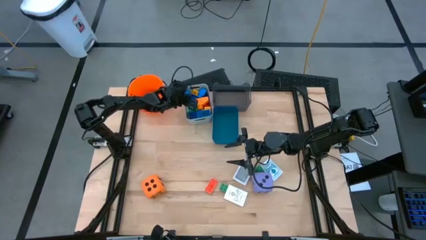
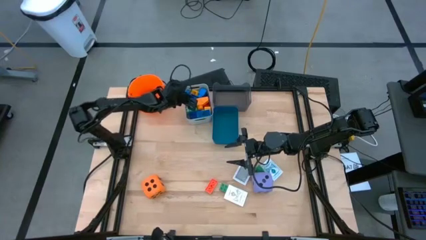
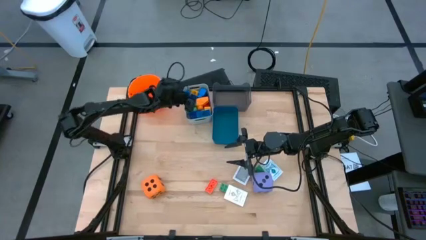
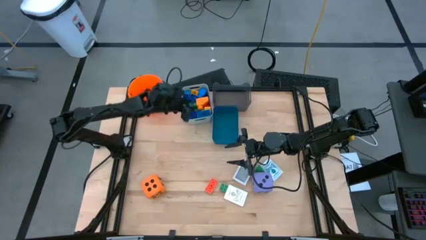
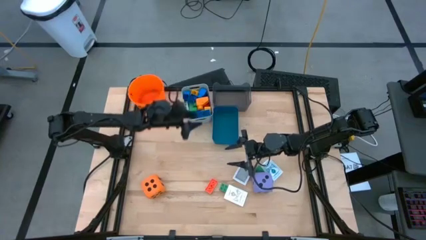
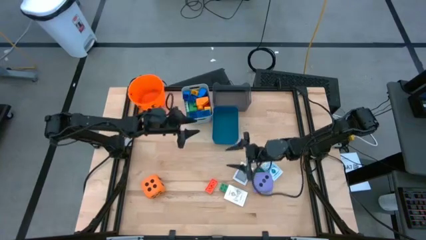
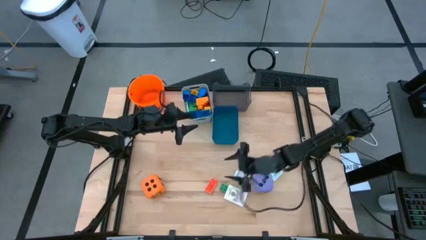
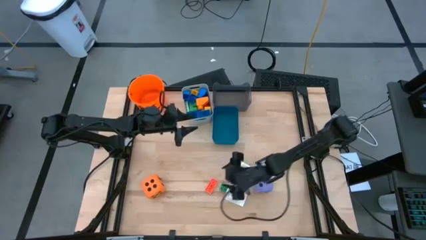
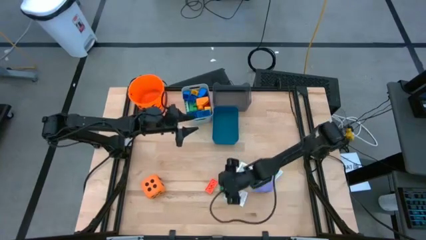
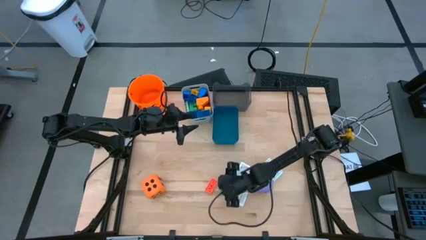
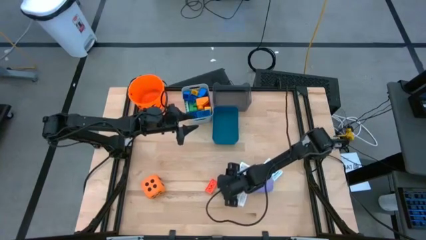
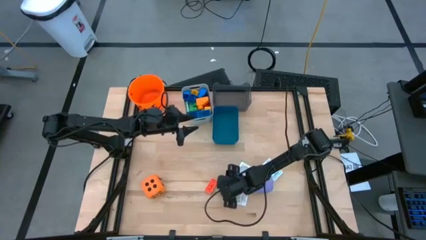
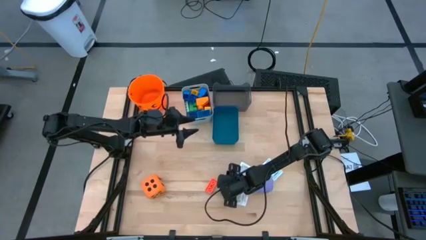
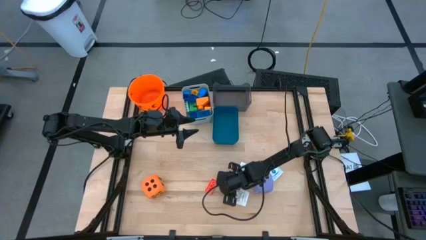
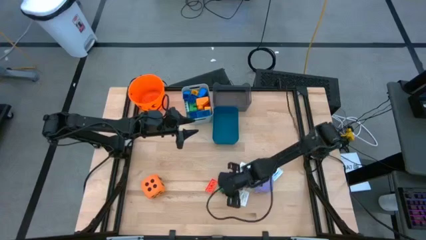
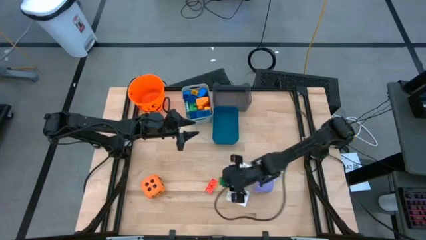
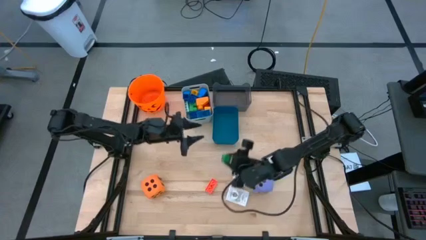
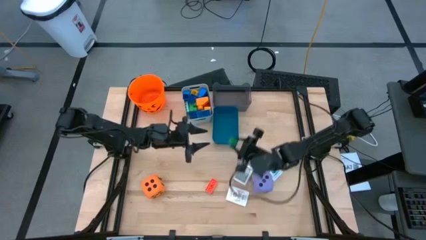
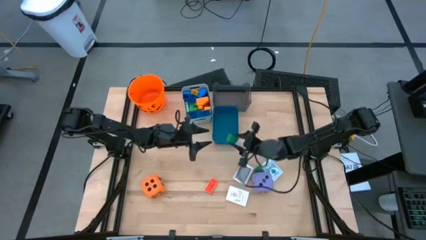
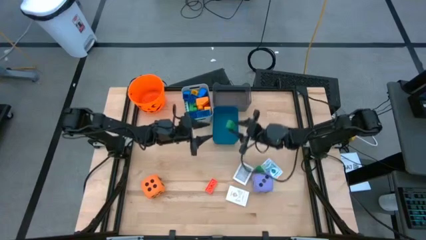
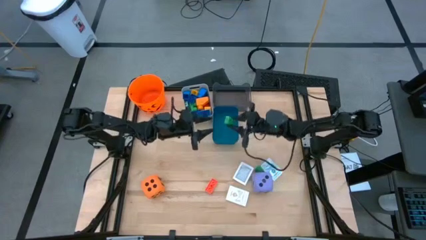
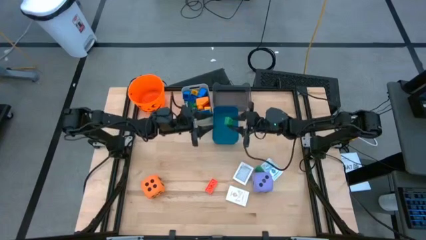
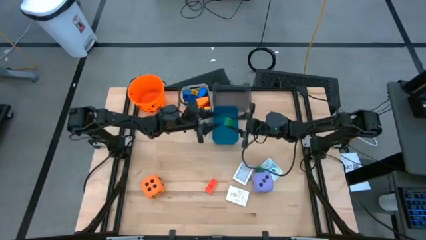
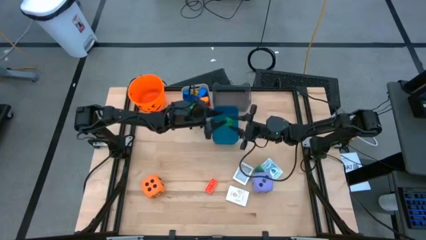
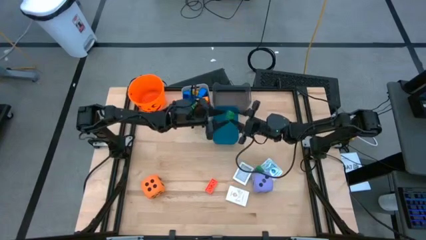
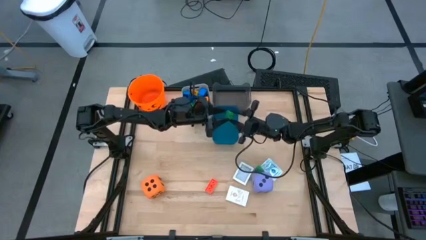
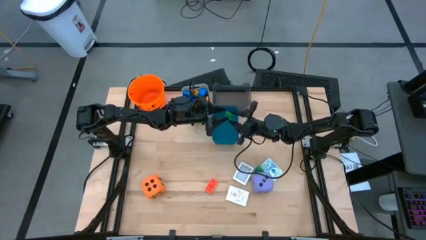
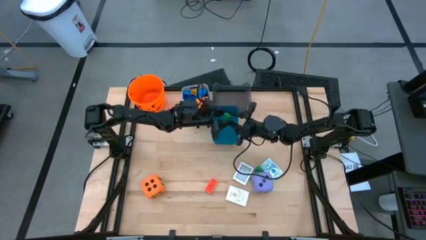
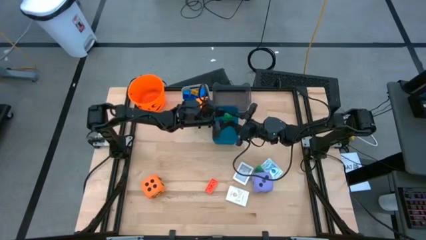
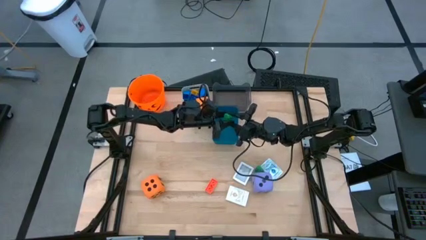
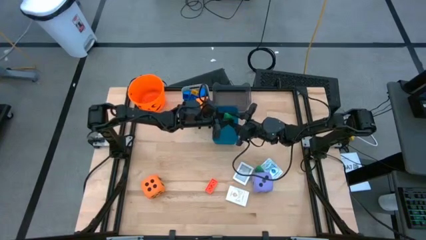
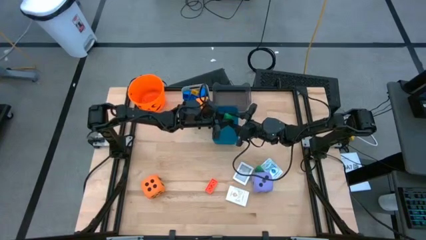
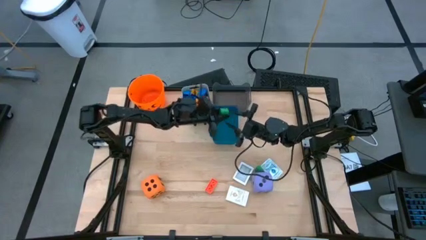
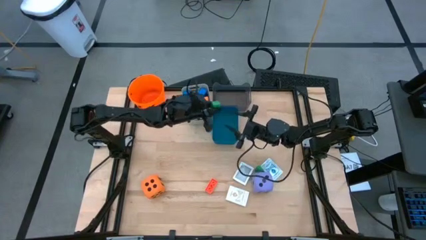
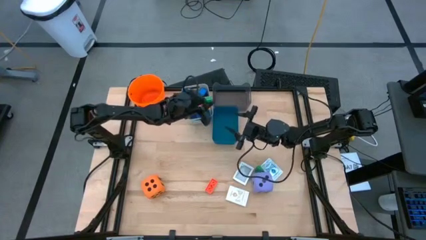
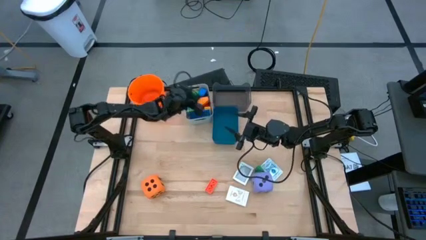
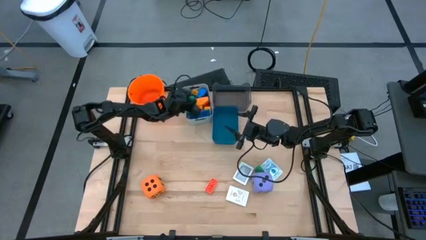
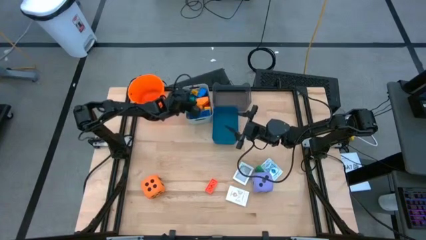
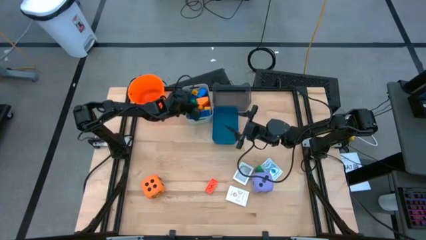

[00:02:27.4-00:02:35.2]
Task: Pick & Place Toys
Put the small green gamepiece into the white bin

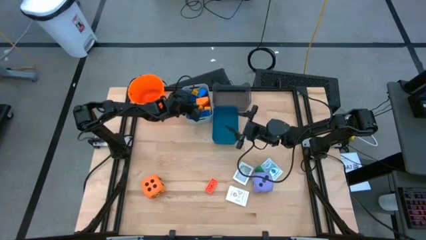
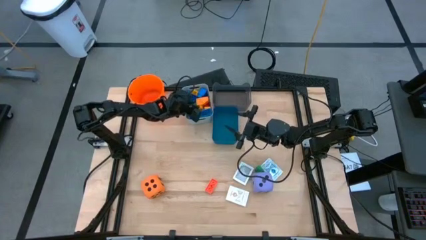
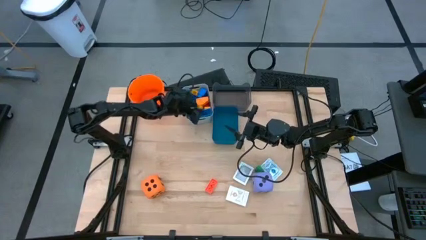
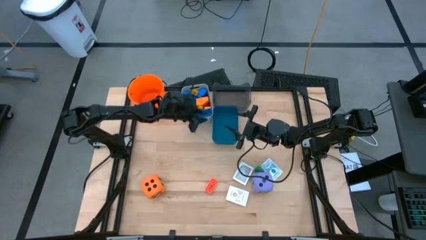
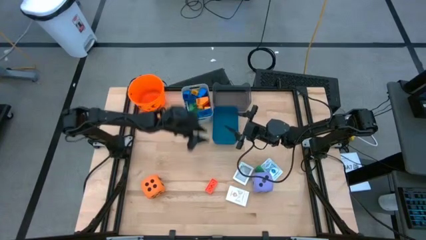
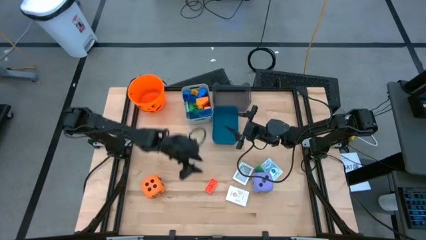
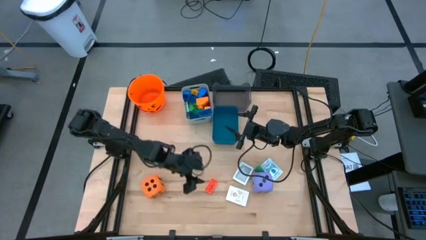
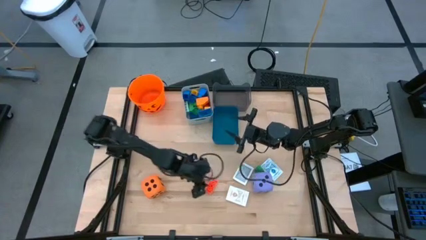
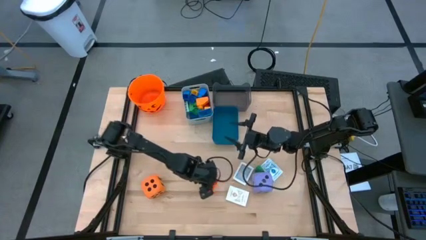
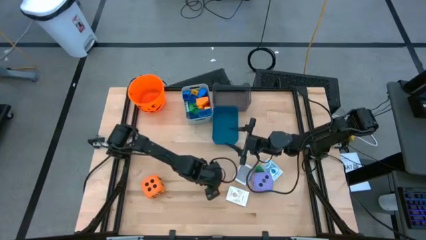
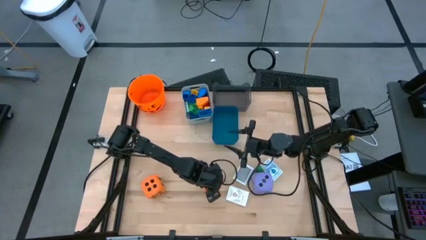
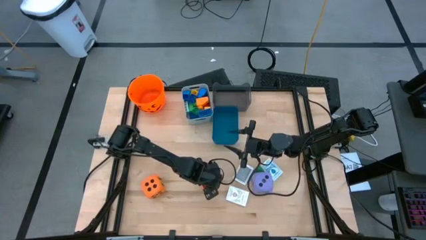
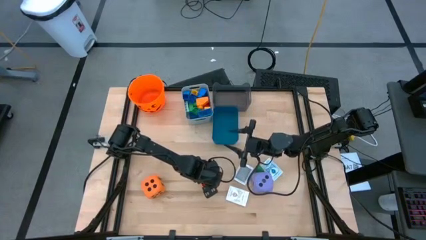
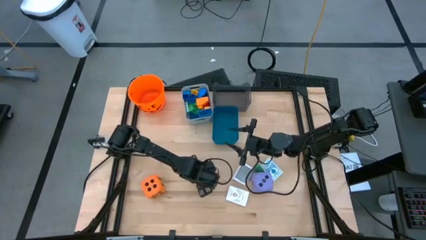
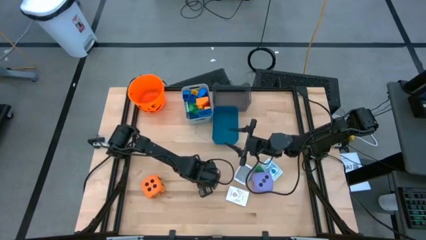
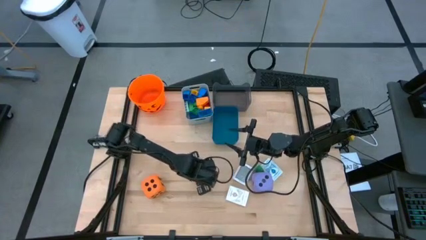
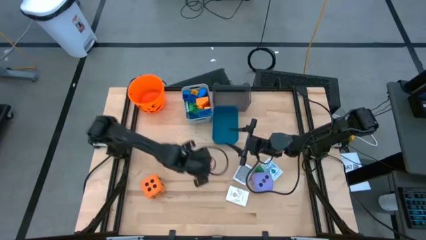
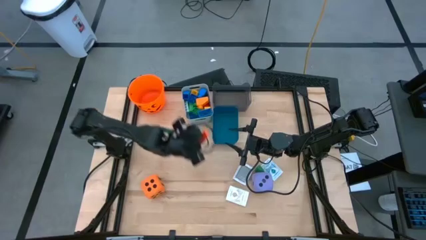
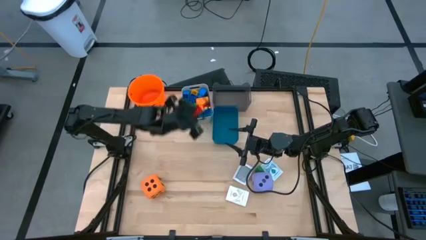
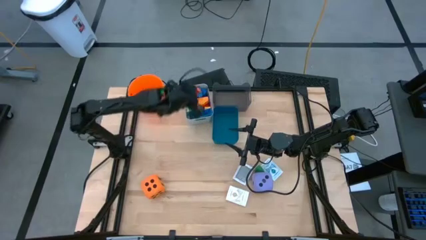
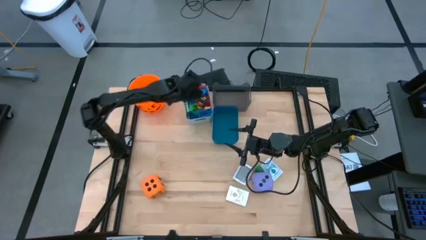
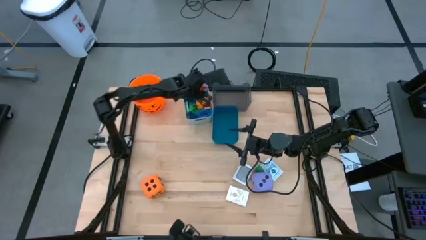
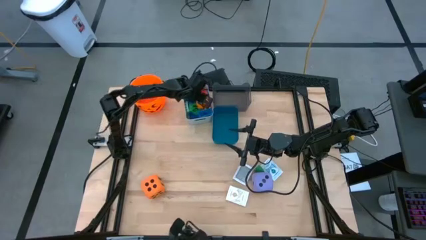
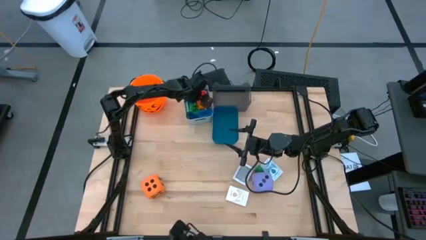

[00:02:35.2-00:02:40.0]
Put the small orange gamepiece into the white bin

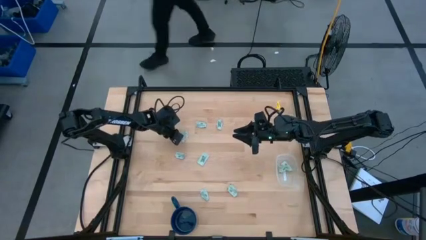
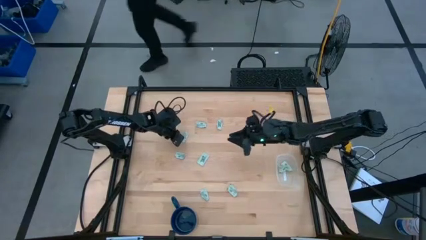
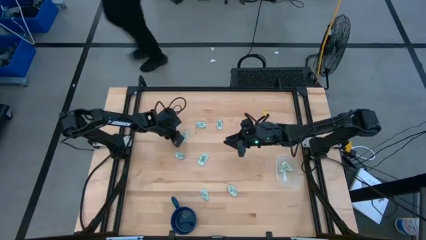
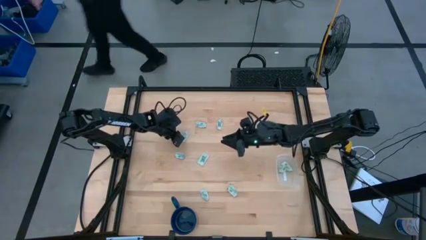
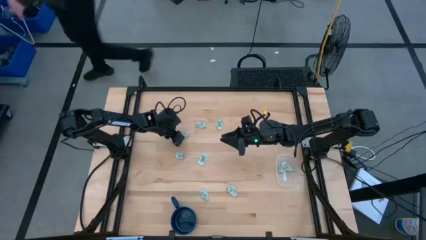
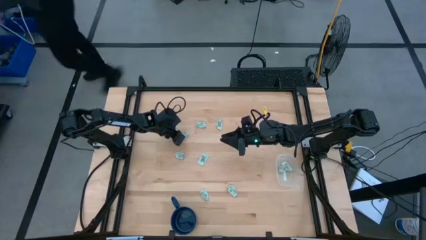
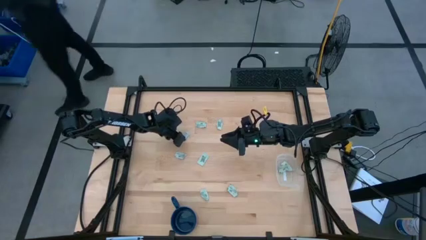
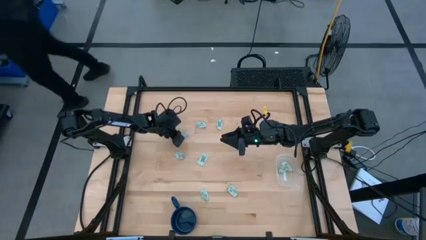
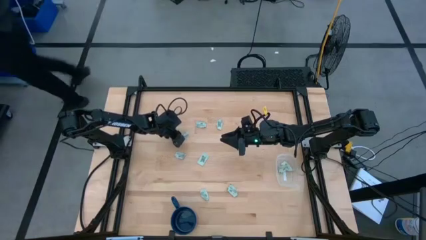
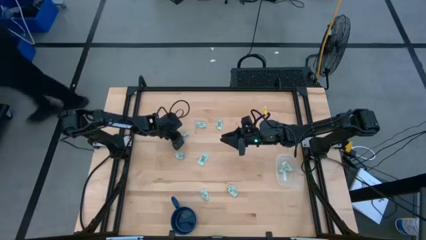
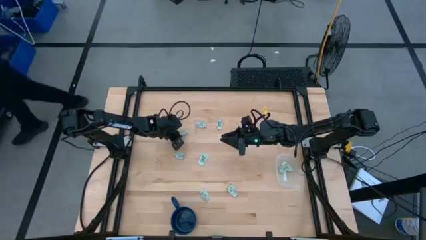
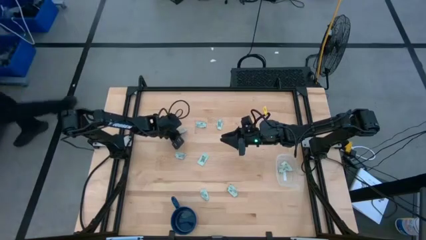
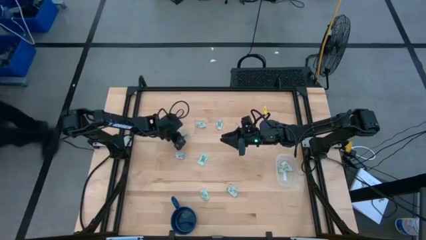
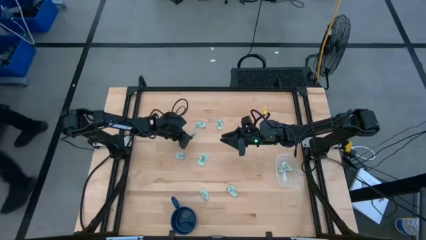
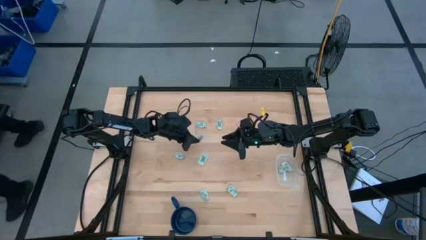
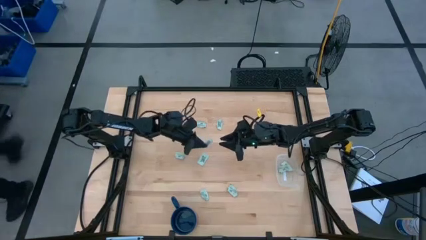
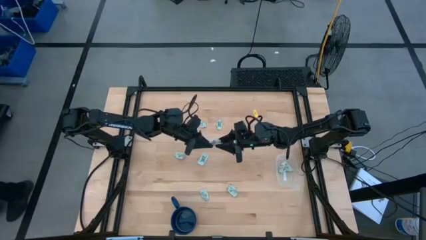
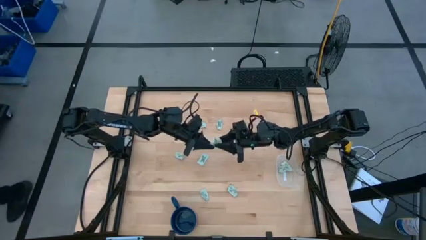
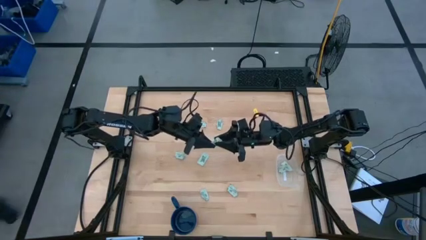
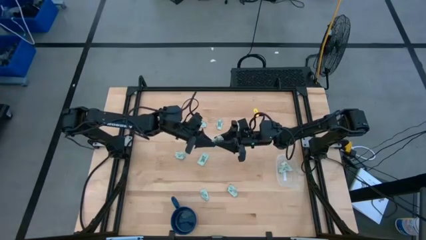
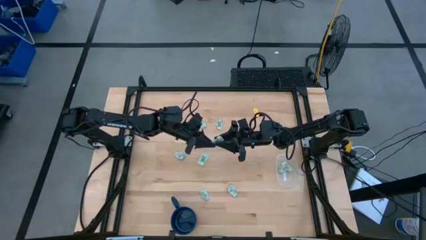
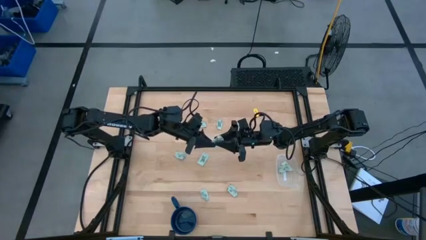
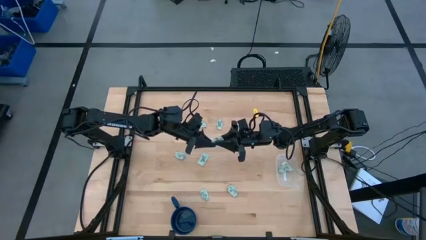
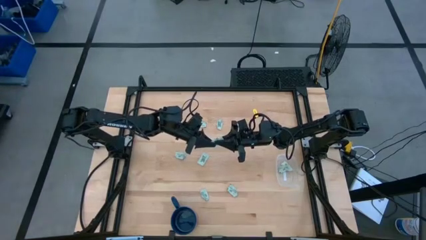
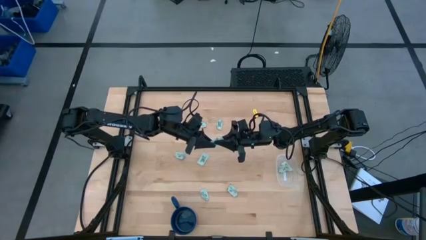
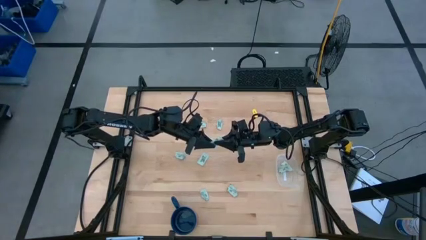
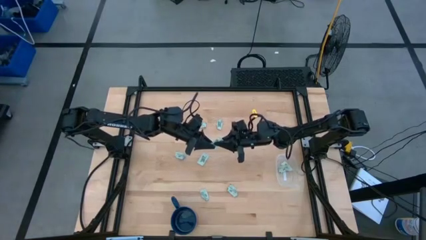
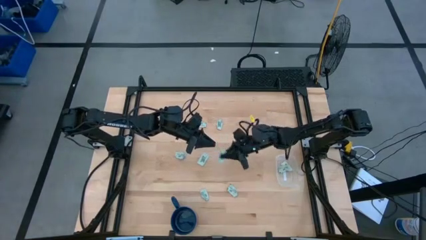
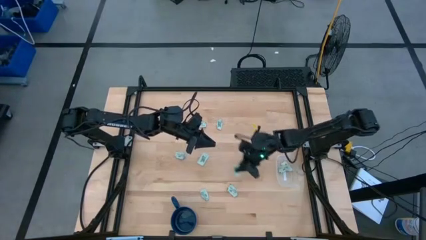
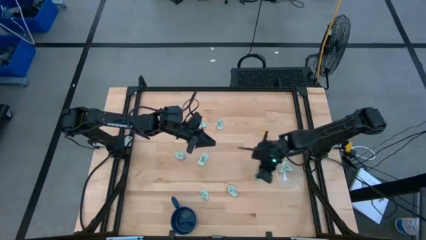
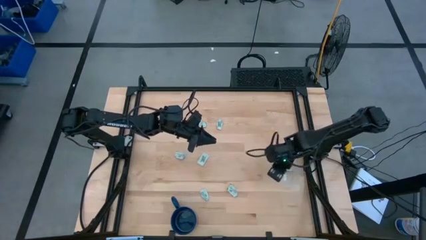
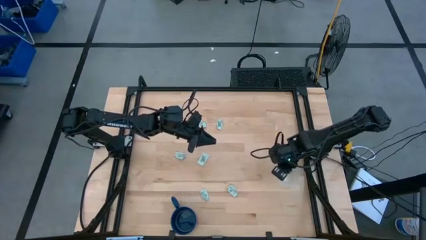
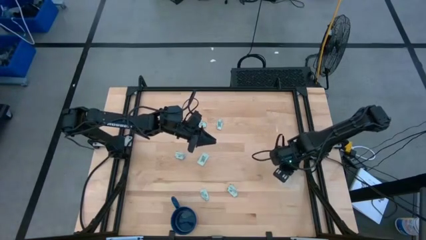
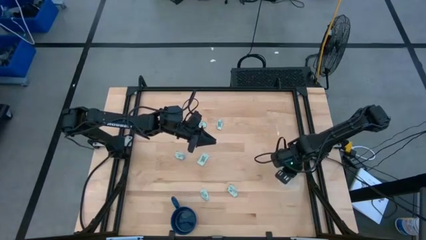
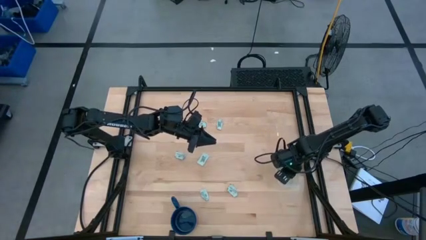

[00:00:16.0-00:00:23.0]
Task: Pick and place Stevia / Truvia into bins
Put the green stevia packet into the transparent container
